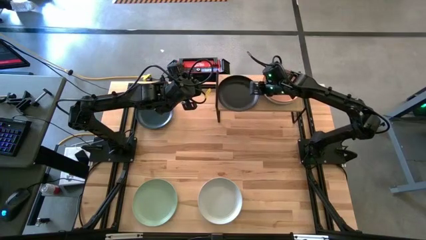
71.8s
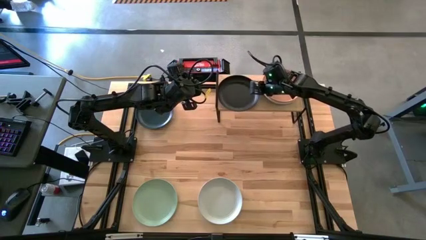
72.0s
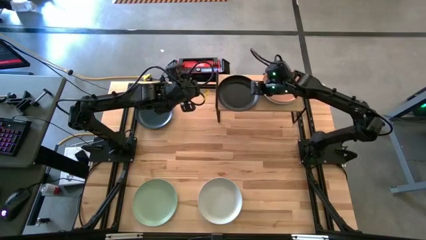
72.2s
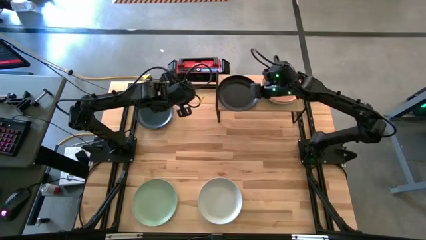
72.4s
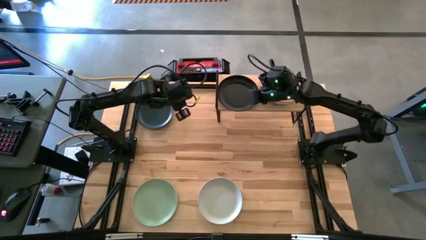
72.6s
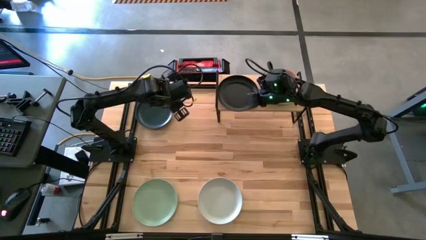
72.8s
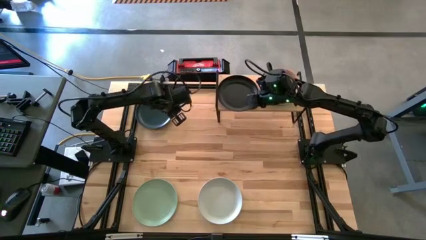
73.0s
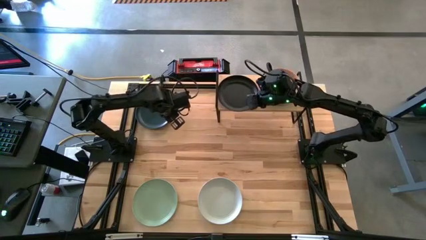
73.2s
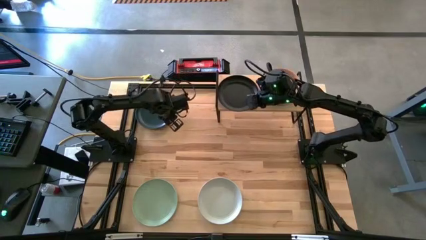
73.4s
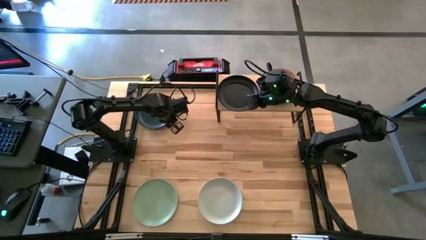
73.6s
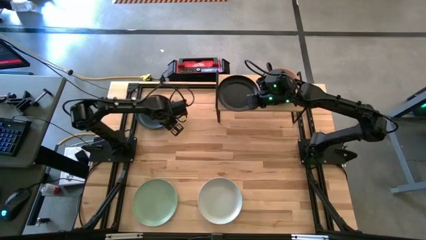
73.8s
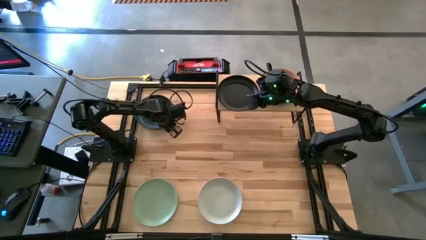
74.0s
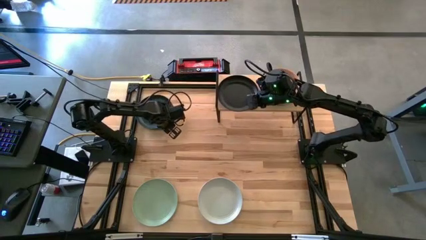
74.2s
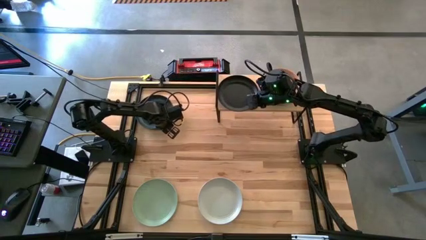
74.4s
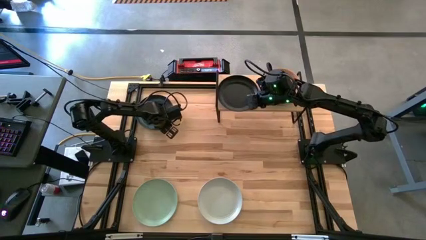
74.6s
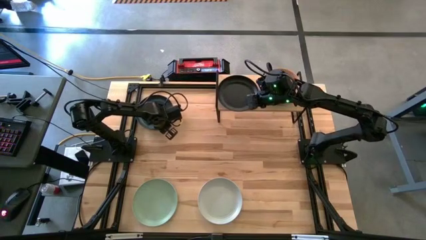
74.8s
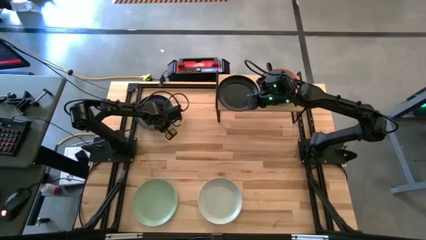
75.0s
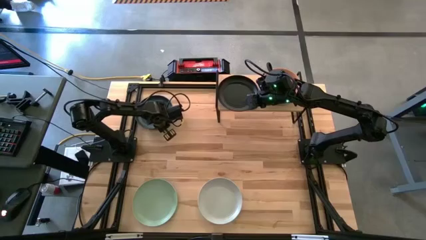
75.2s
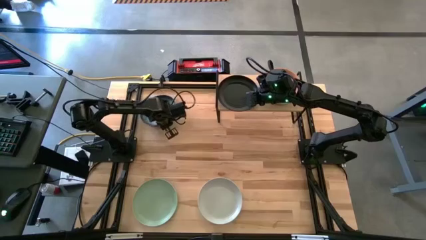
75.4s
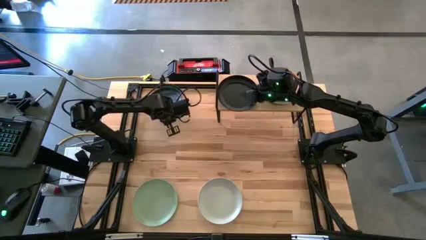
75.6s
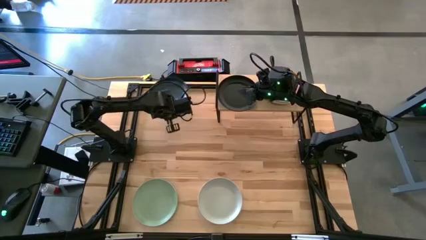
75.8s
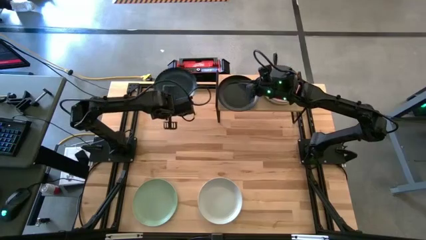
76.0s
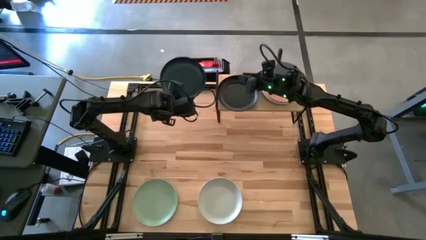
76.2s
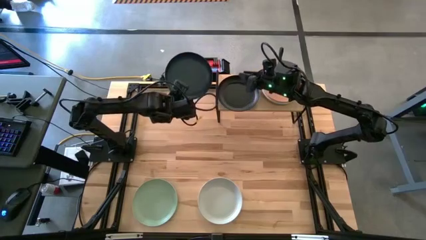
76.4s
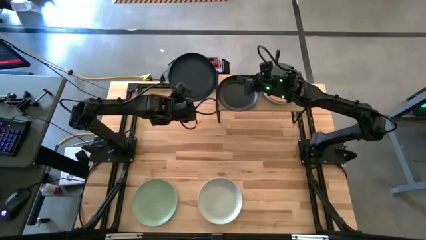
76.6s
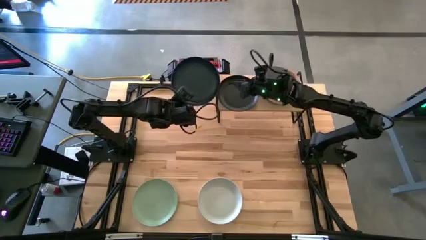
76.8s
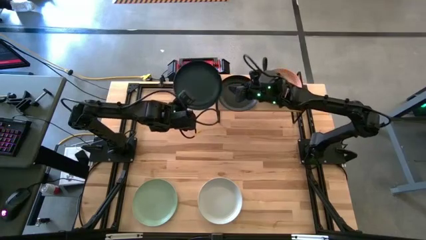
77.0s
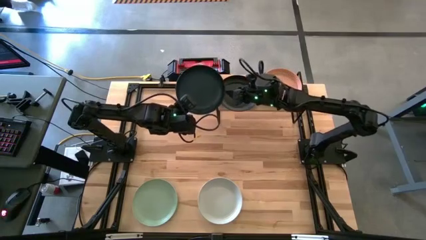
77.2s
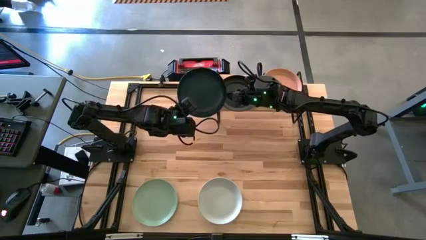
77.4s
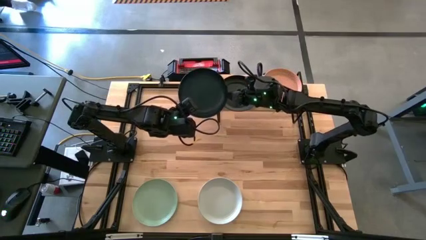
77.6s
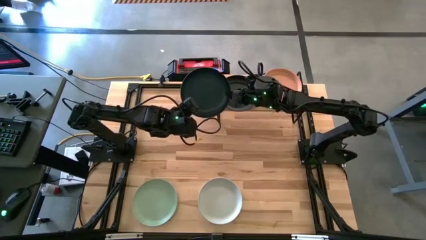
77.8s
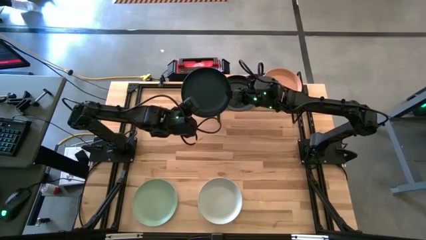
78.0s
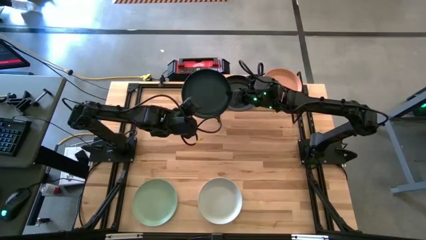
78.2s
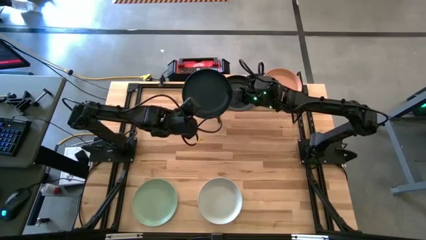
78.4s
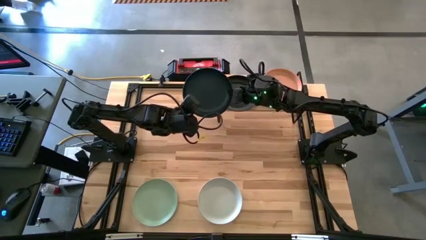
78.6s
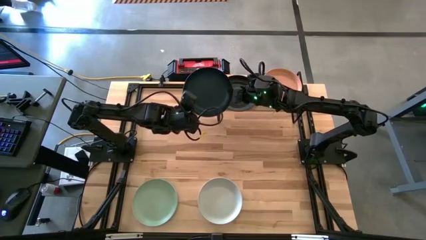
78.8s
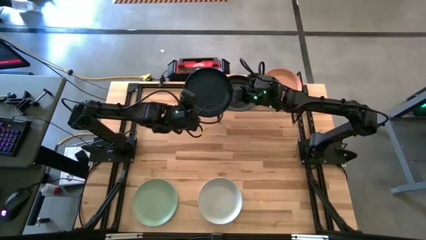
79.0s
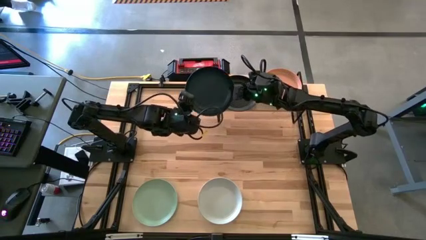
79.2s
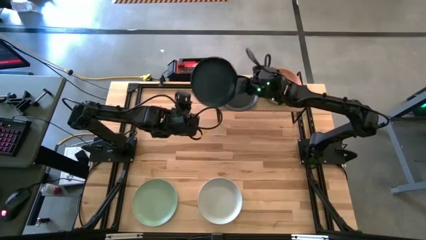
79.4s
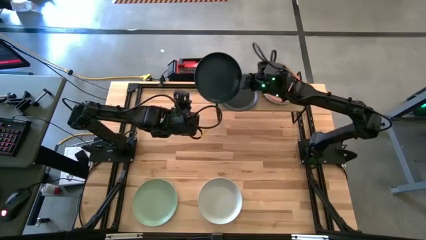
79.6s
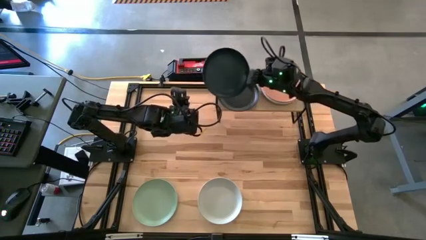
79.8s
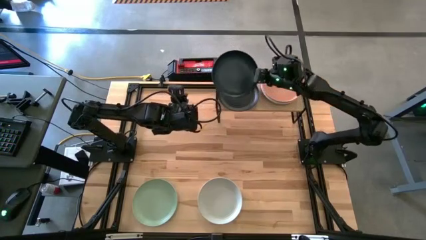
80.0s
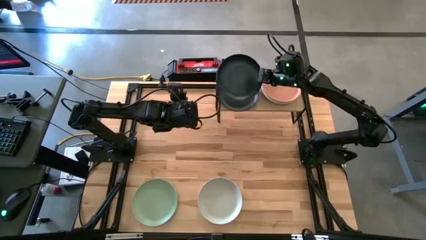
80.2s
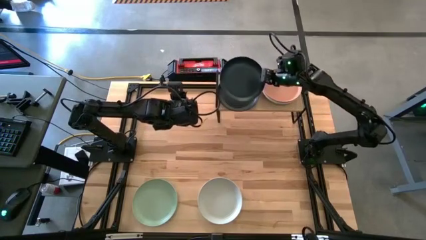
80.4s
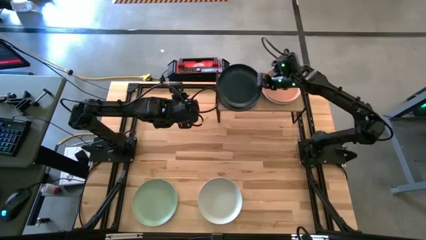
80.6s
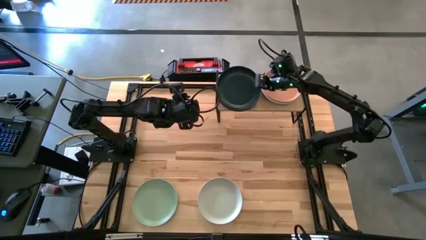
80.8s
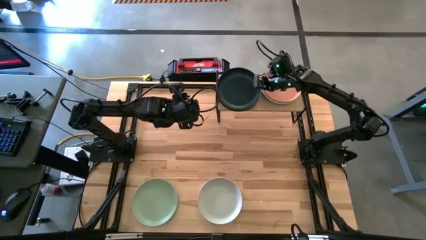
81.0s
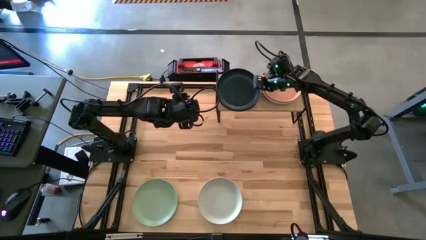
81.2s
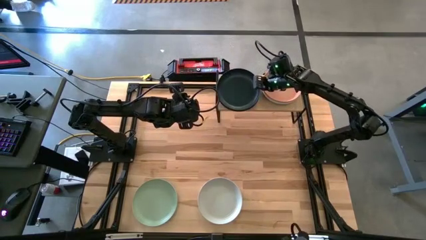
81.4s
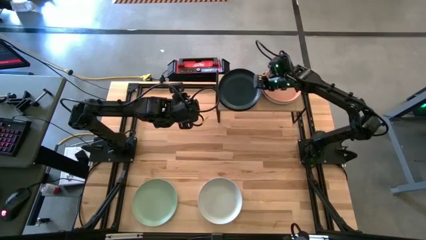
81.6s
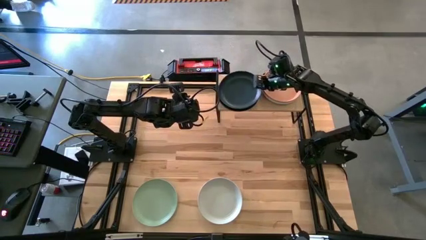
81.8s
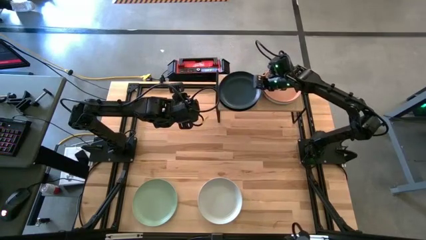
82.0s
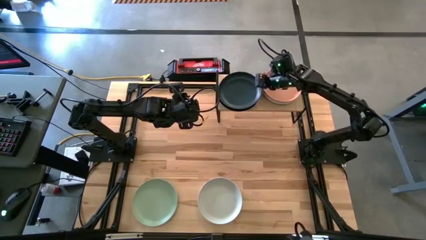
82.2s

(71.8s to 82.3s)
Task: Place and stack plates onto a shelf
Stack the black plate on top of the black plate on the shelf

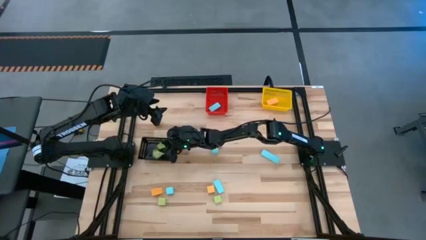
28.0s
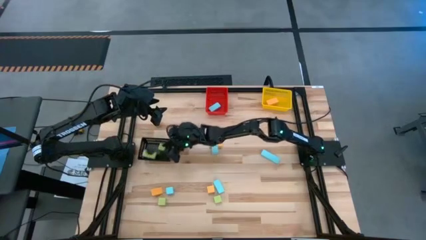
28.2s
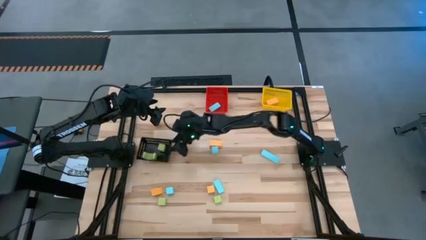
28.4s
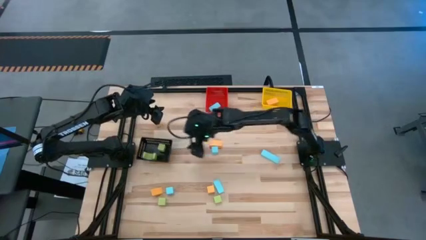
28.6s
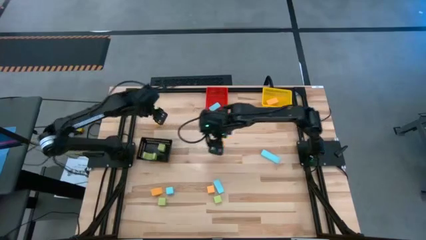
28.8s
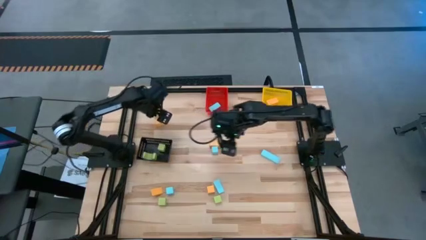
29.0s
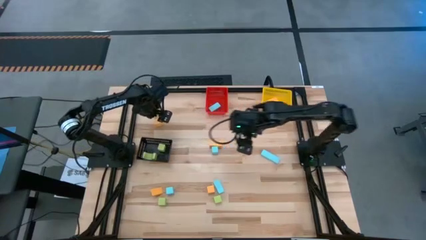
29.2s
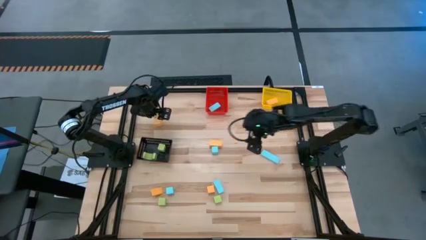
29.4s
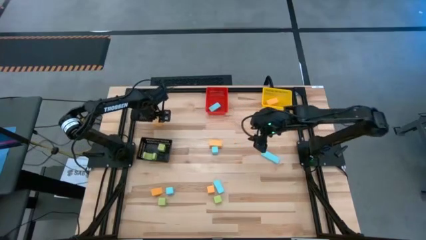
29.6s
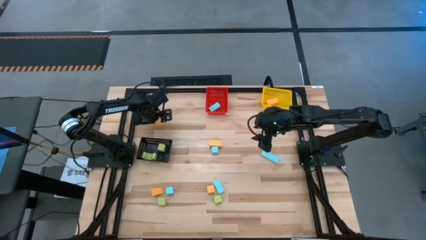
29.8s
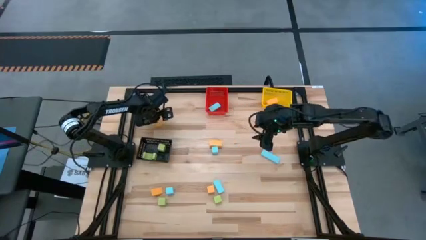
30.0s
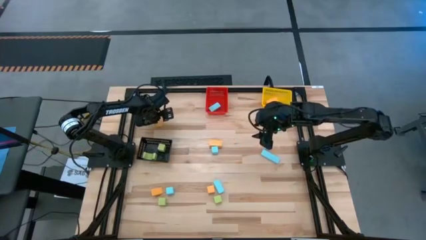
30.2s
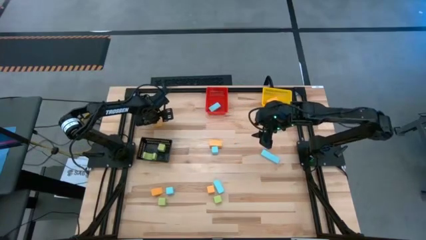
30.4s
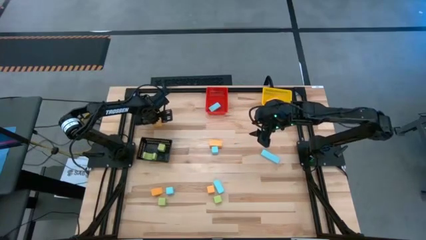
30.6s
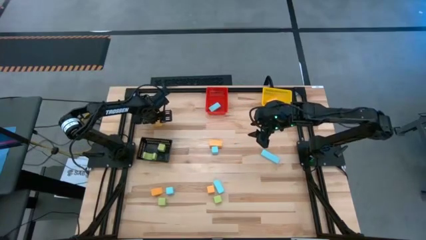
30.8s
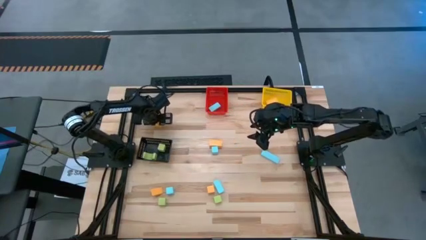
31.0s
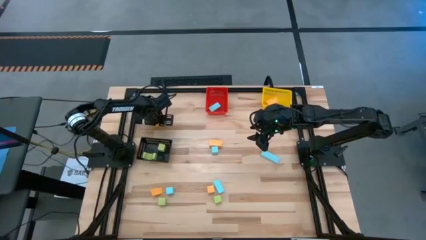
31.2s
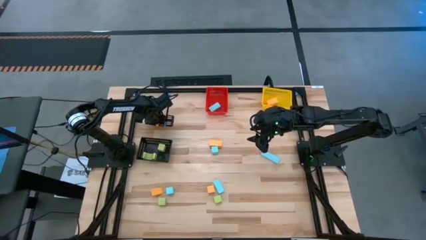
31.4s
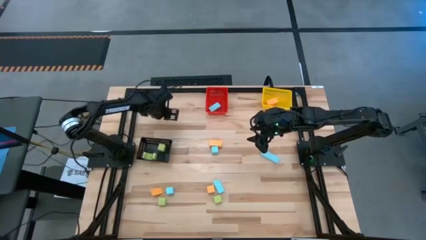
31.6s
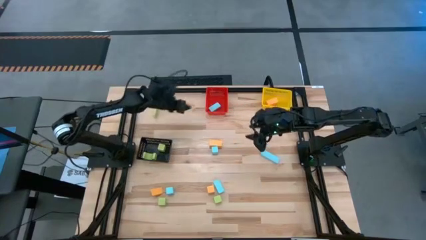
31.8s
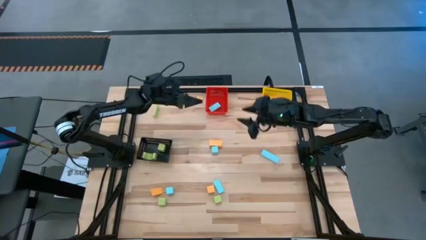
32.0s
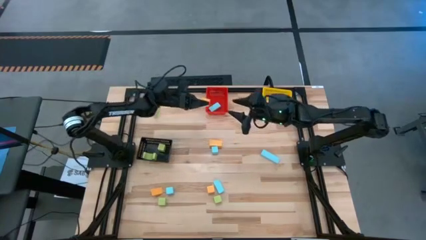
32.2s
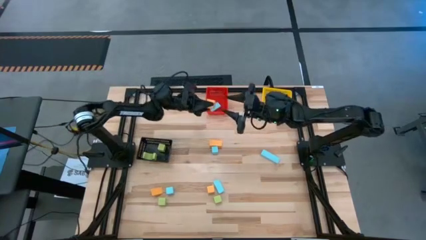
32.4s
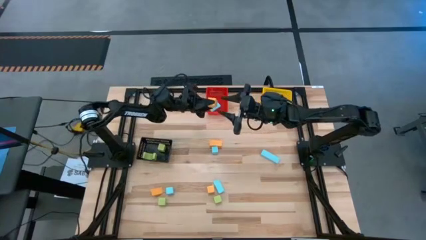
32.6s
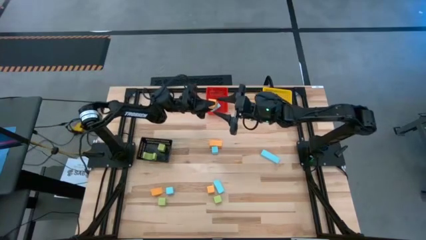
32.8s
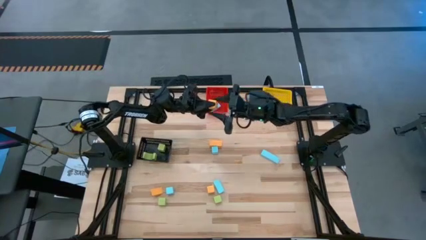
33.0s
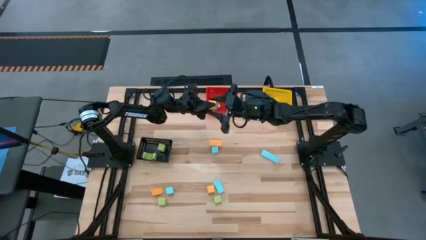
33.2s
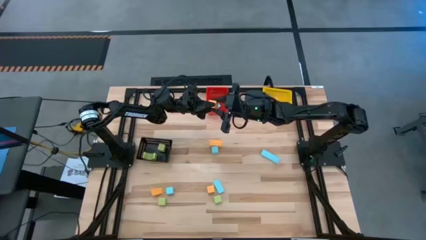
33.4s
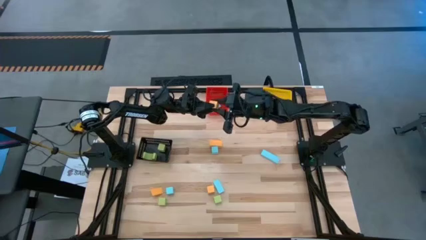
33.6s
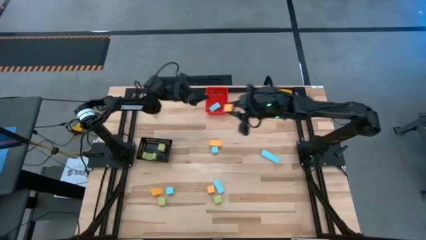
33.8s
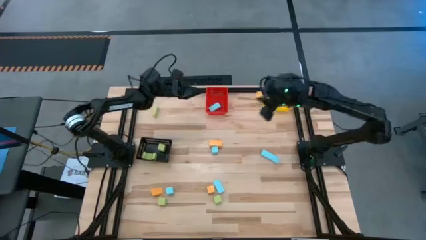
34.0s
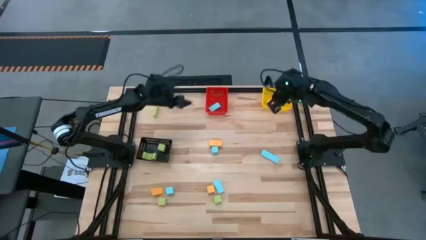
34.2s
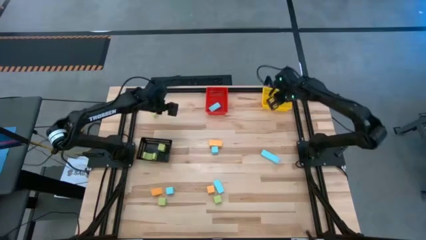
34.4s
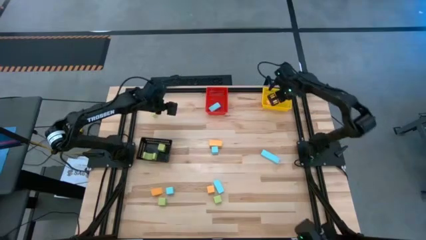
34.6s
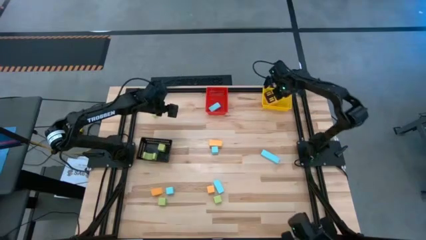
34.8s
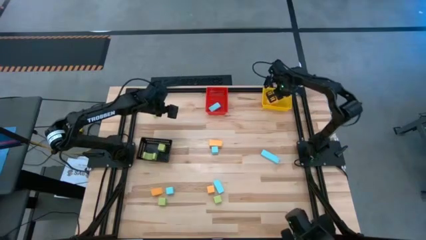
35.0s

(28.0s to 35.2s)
Task: Sort & place blocks by color
Put the yellow block into the yellow bin
